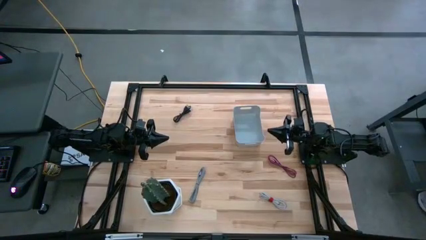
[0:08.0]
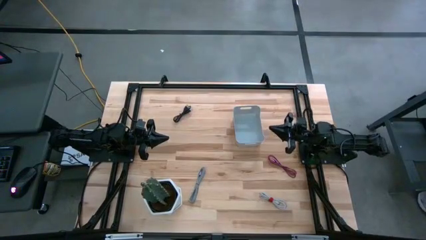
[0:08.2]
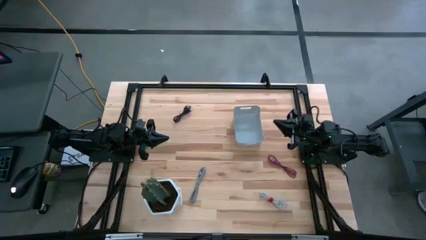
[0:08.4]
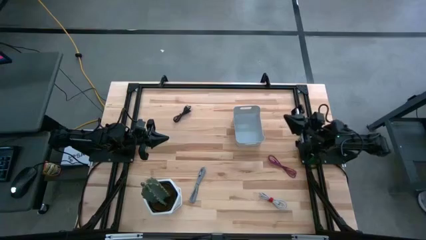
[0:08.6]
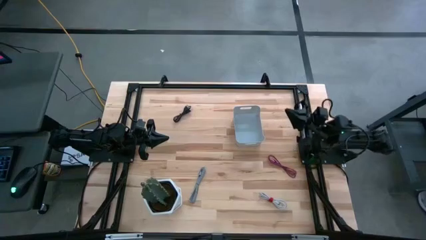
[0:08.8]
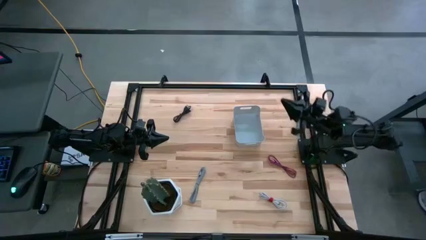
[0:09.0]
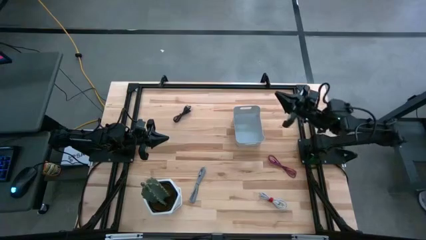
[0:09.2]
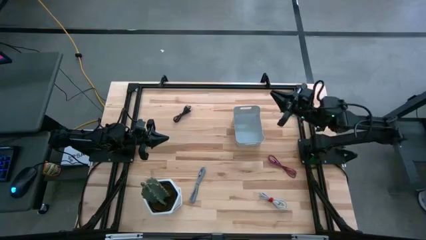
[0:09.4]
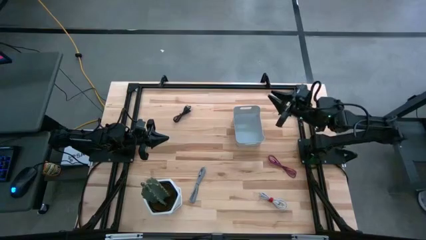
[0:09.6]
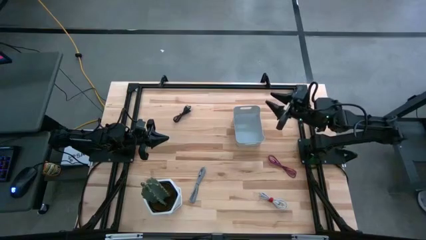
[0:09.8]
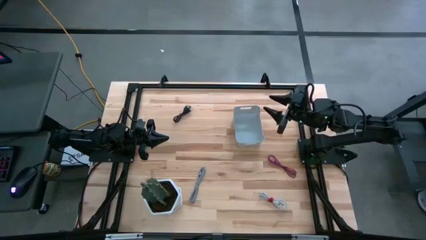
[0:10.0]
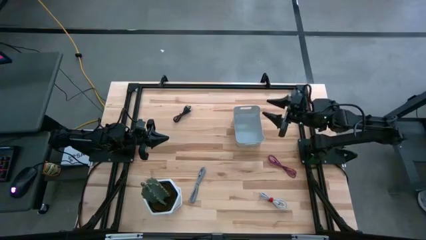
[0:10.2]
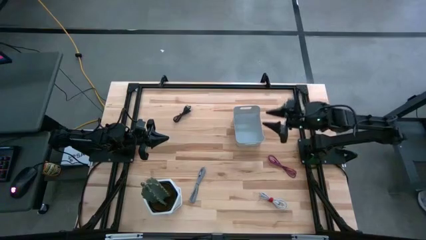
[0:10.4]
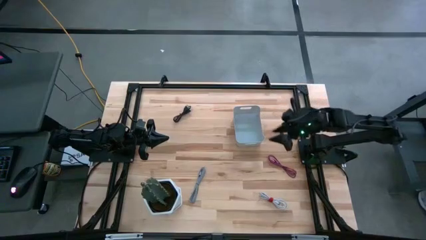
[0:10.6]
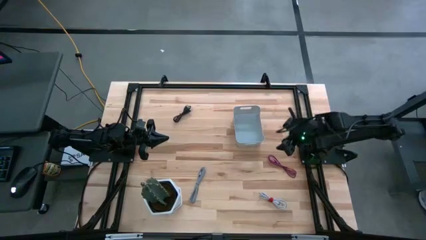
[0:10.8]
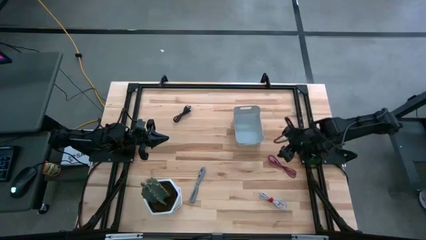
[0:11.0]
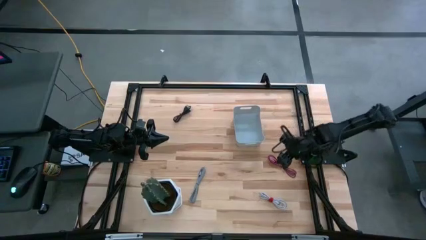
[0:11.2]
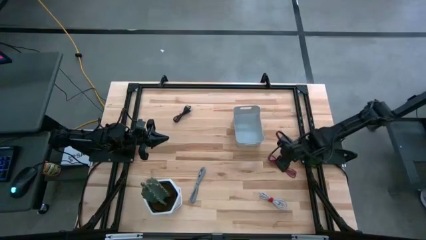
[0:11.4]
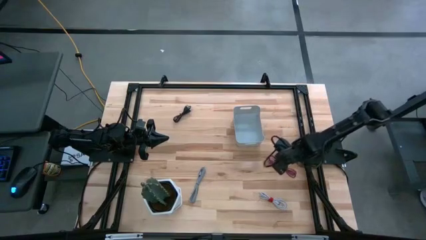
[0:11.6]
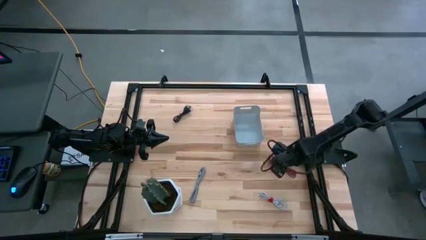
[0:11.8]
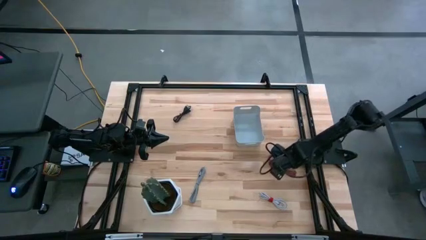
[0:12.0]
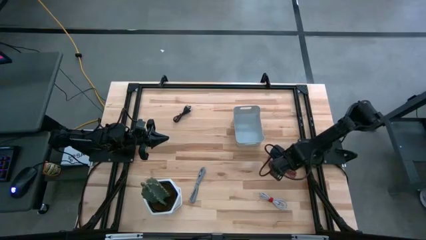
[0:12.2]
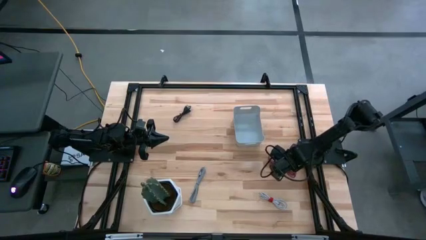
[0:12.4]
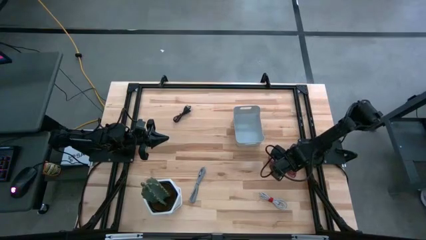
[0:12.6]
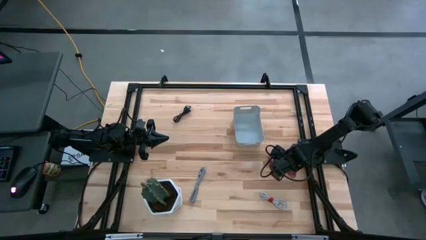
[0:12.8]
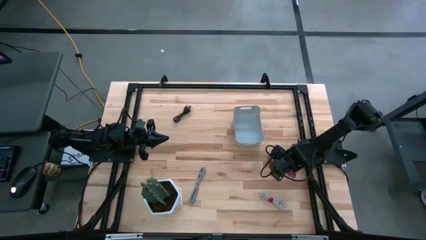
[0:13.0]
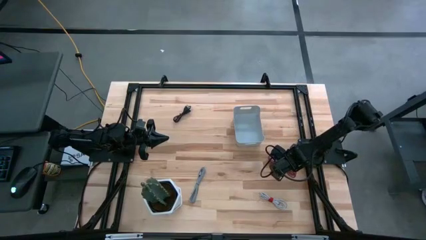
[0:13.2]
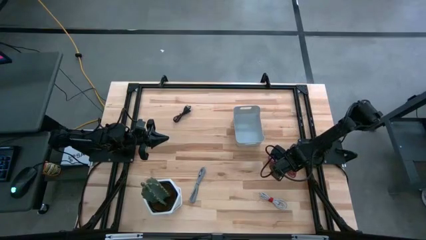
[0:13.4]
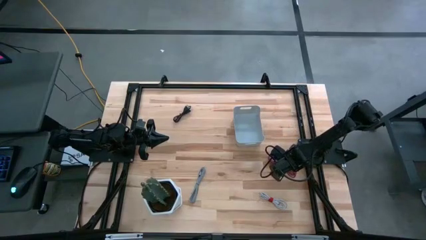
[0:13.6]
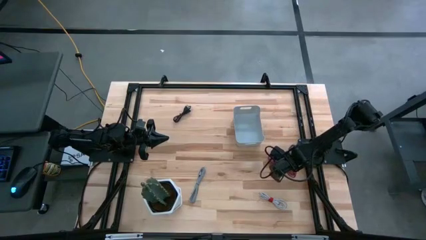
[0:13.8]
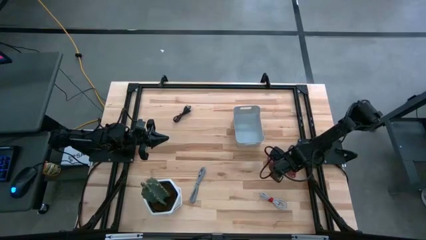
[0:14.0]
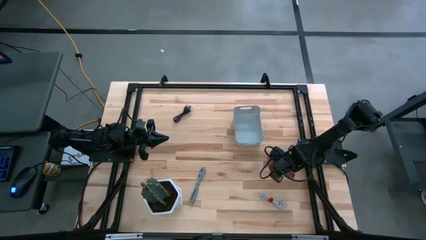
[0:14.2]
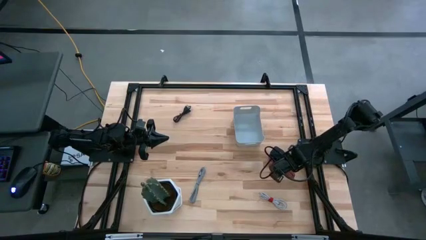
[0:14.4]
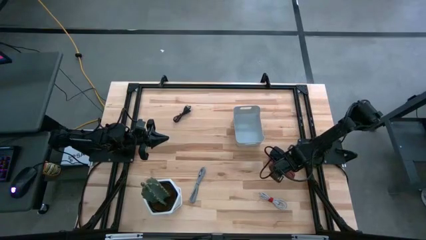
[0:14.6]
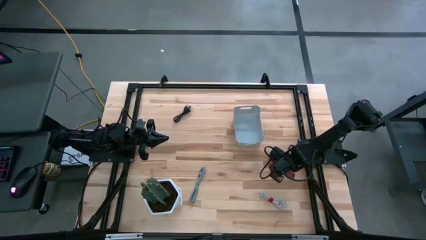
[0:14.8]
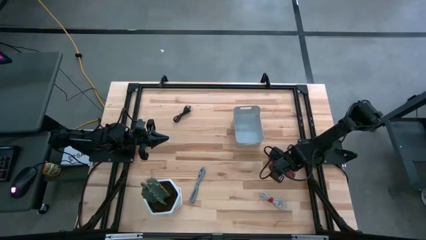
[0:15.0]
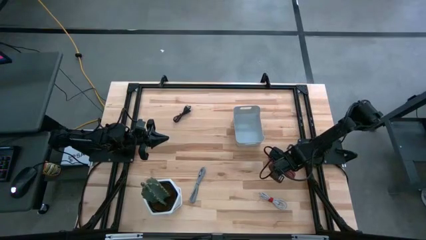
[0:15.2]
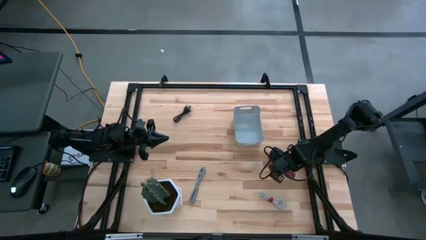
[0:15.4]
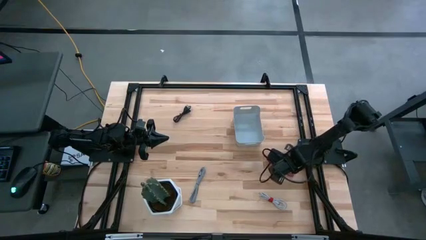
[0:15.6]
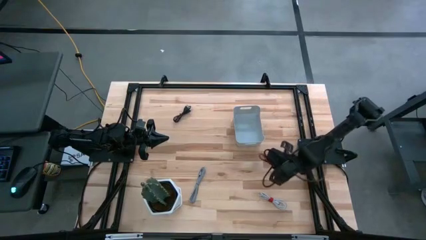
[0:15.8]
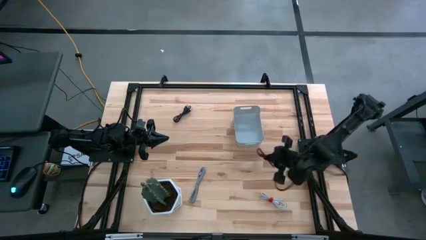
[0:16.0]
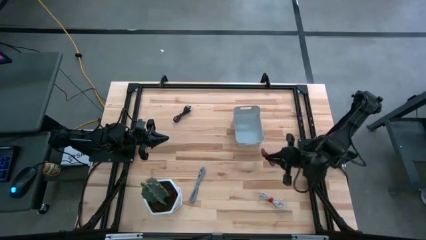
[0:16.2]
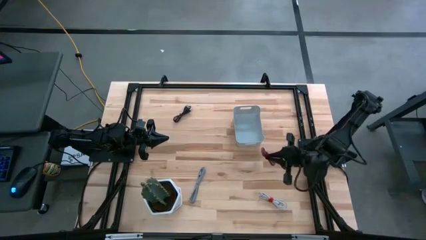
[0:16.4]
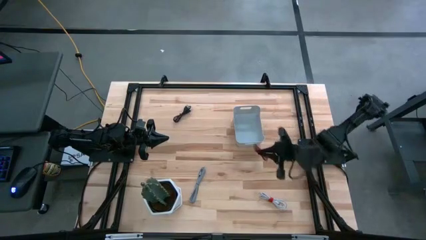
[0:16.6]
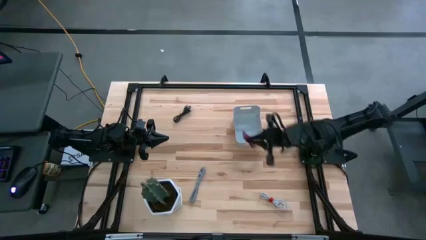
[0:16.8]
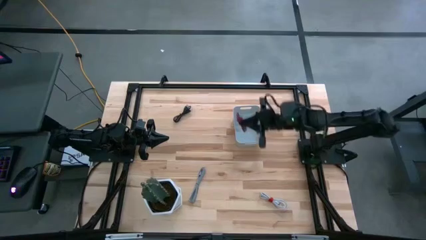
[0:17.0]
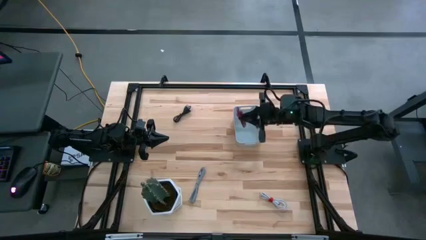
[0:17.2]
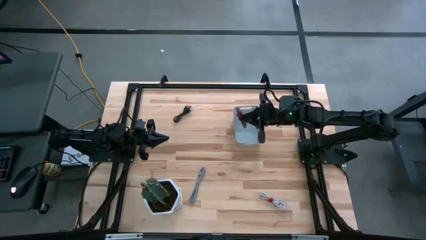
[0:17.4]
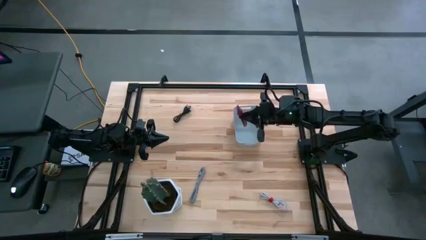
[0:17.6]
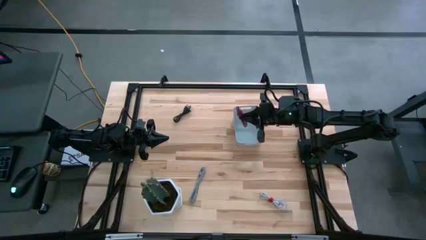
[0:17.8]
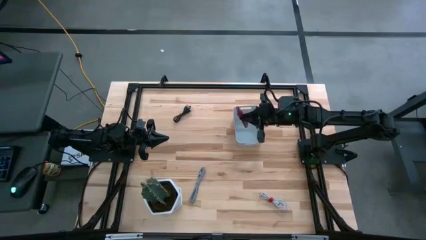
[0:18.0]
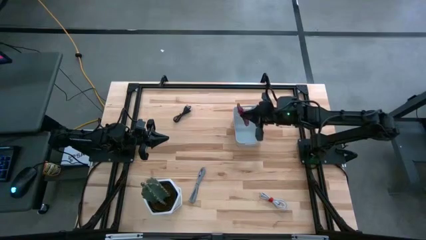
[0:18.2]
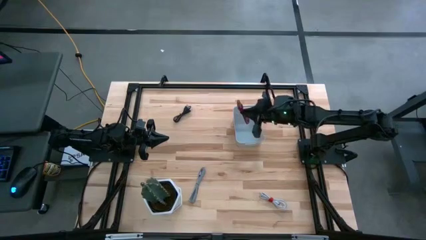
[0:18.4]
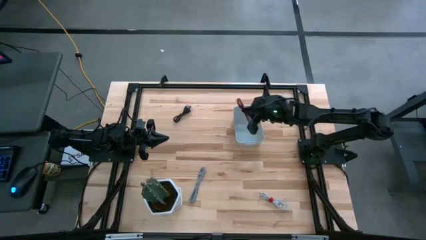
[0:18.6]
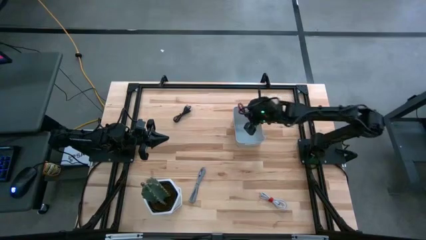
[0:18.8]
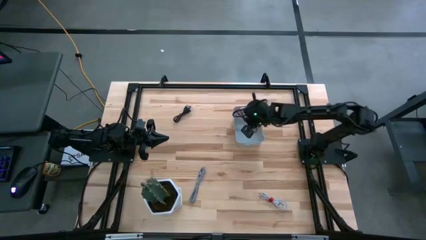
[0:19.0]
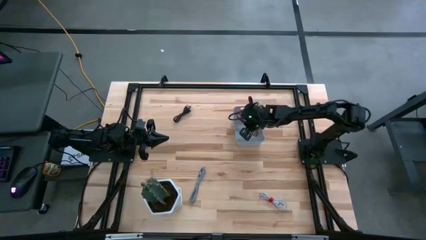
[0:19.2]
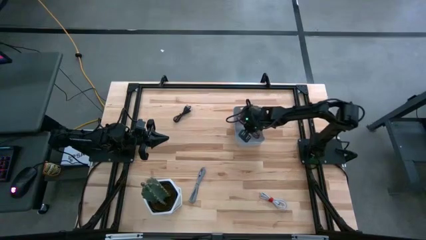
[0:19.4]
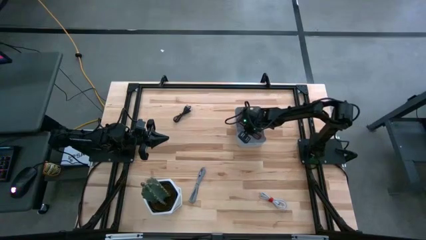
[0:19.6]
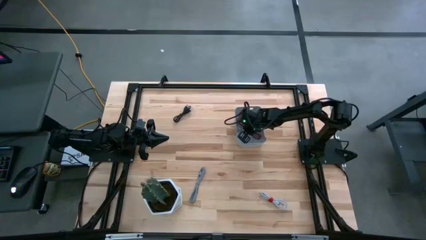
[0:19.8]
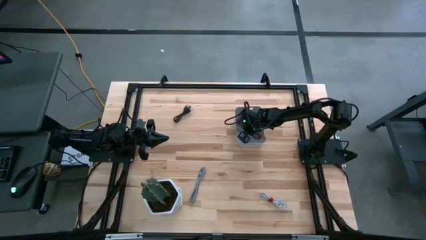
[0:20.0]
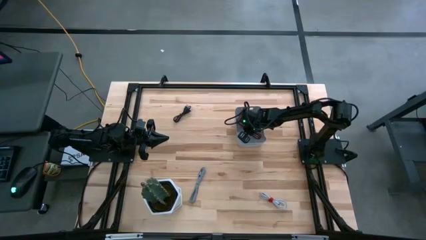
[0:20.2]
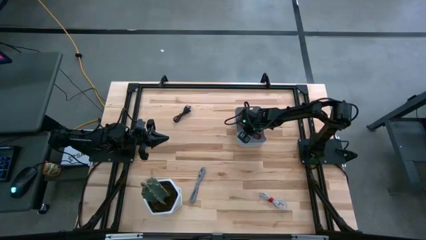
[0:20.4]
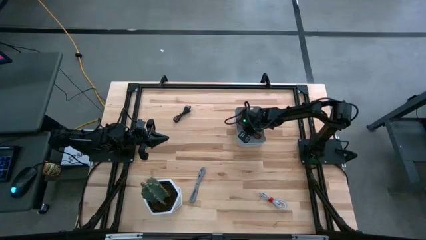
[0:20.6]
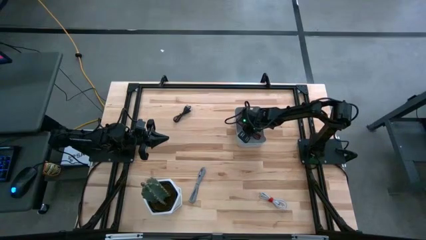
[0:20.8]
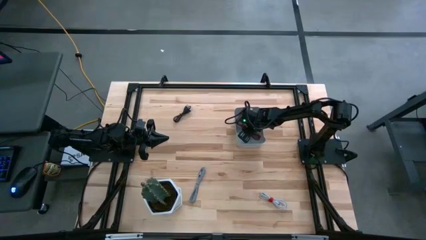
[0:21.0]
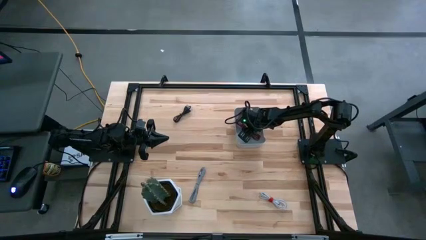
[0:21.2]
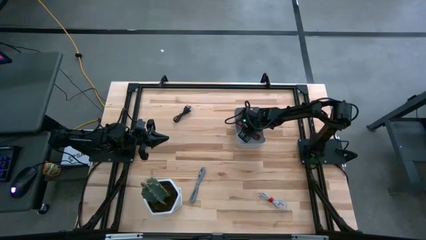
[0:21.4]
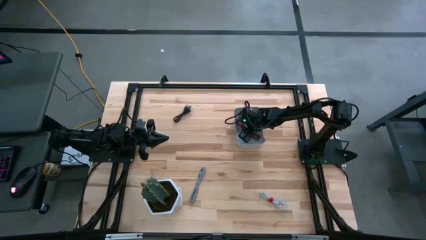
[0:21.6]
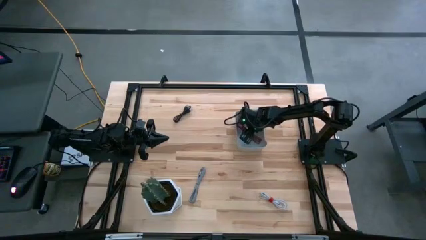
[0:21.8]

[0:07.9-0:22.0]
Task: Pick and place USB-C Cables
Put the pink charger cable into the gray bin
